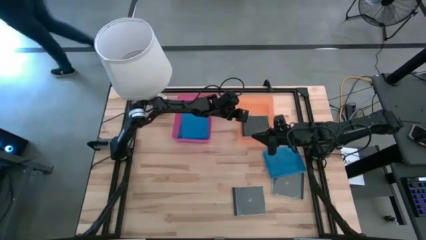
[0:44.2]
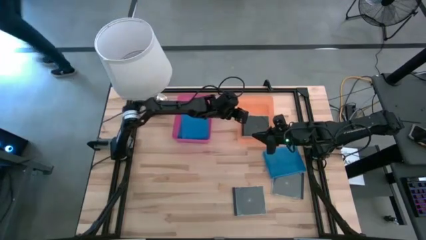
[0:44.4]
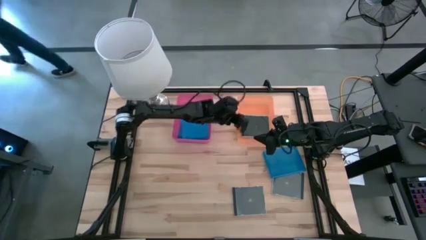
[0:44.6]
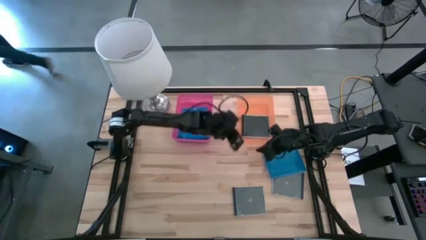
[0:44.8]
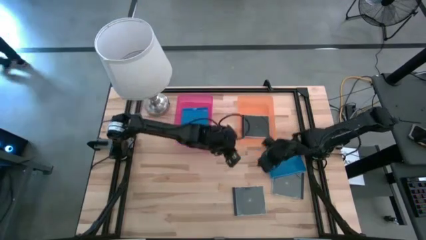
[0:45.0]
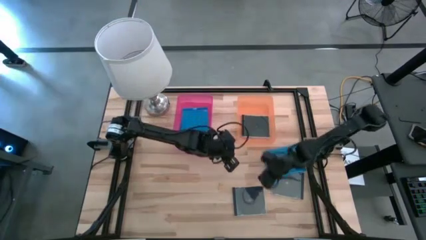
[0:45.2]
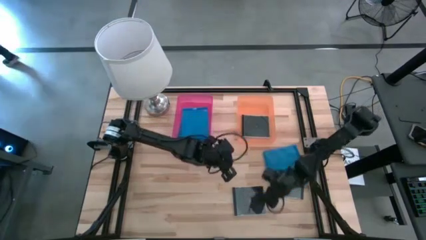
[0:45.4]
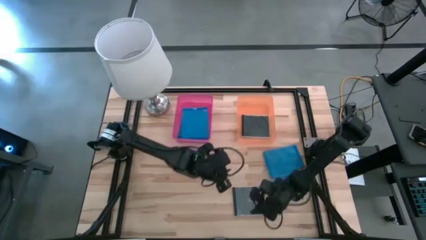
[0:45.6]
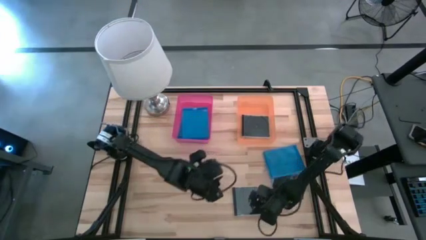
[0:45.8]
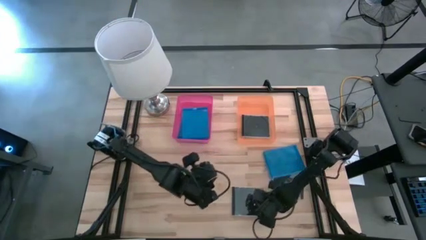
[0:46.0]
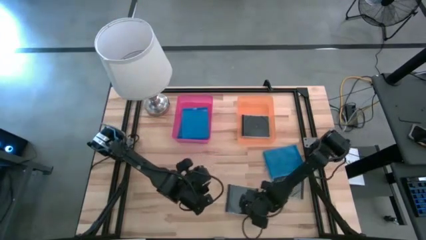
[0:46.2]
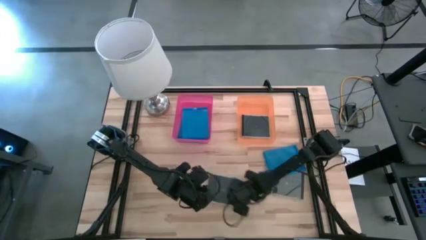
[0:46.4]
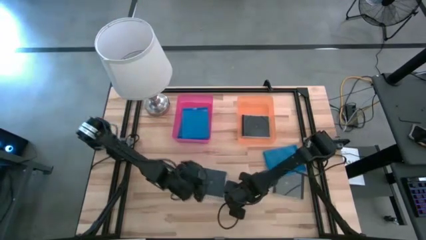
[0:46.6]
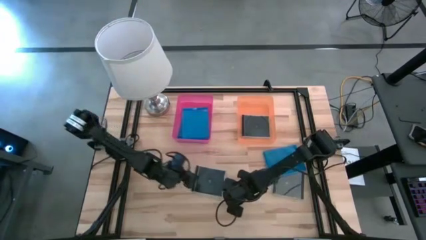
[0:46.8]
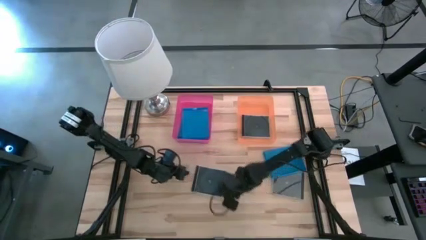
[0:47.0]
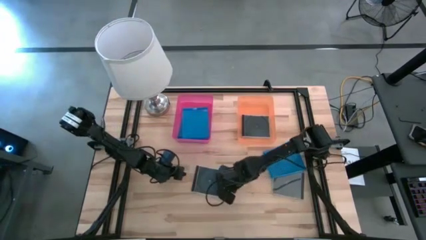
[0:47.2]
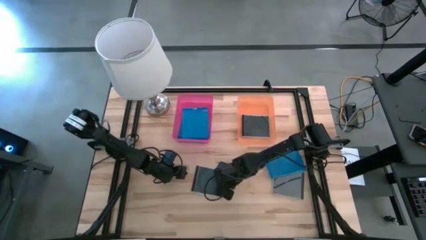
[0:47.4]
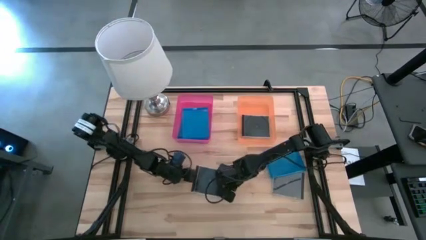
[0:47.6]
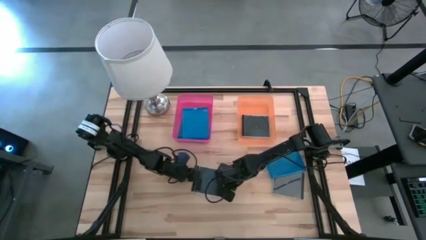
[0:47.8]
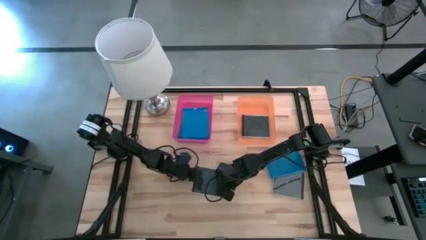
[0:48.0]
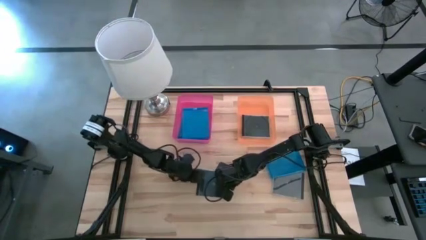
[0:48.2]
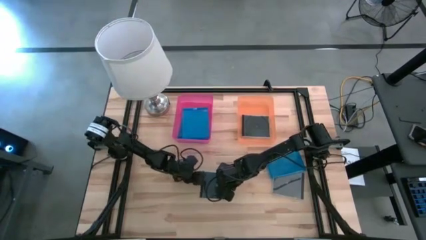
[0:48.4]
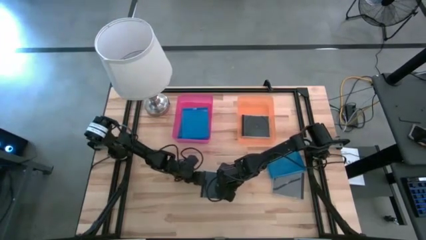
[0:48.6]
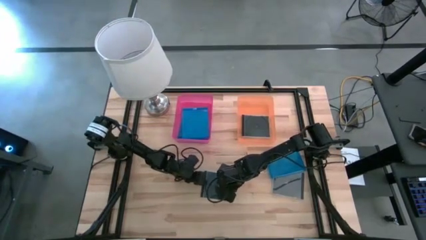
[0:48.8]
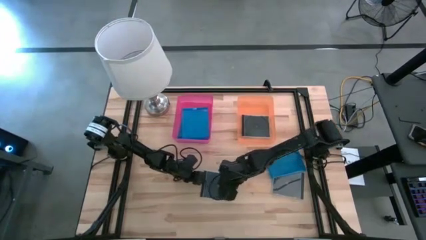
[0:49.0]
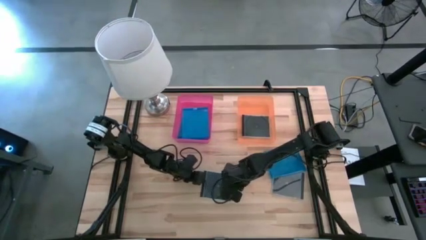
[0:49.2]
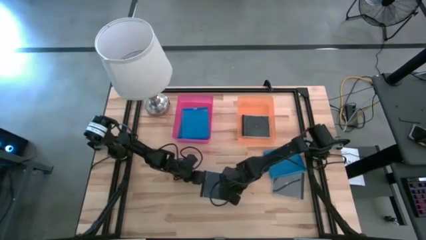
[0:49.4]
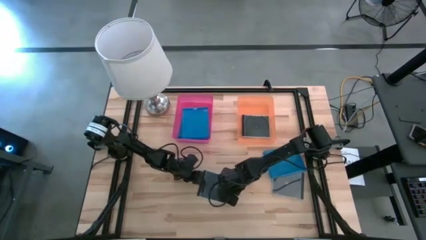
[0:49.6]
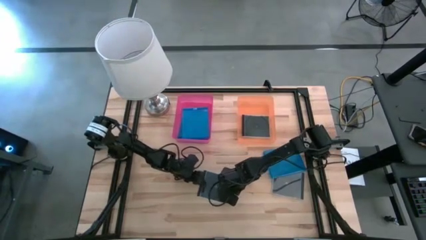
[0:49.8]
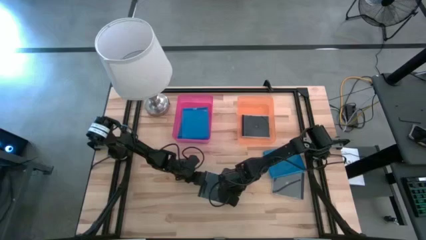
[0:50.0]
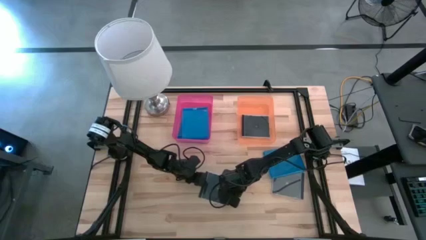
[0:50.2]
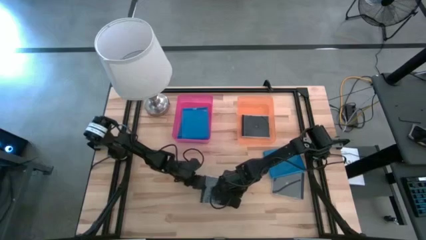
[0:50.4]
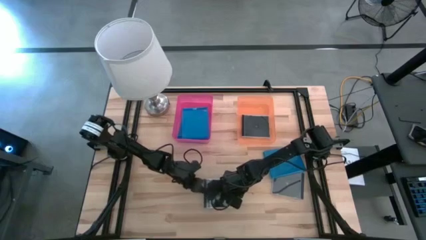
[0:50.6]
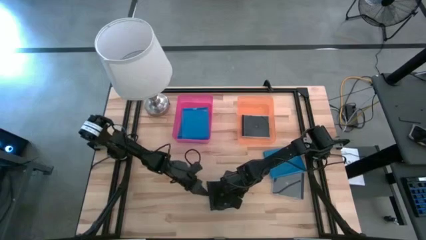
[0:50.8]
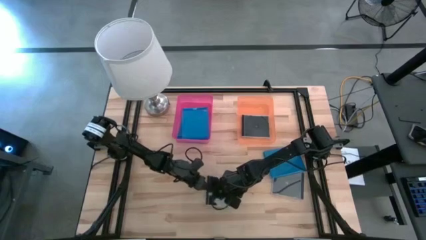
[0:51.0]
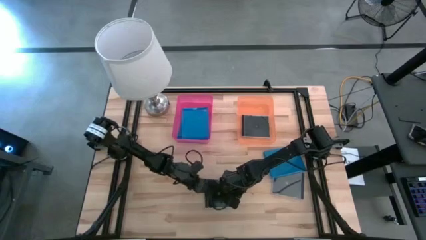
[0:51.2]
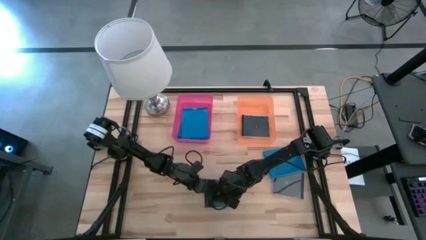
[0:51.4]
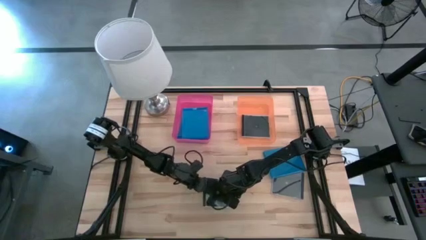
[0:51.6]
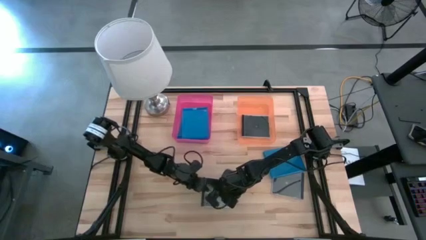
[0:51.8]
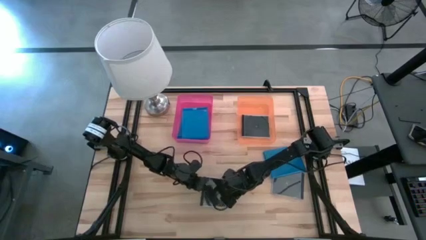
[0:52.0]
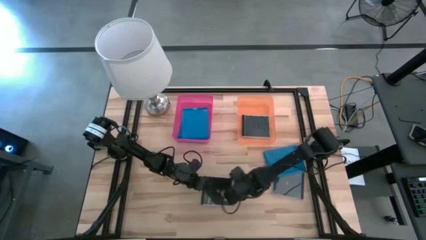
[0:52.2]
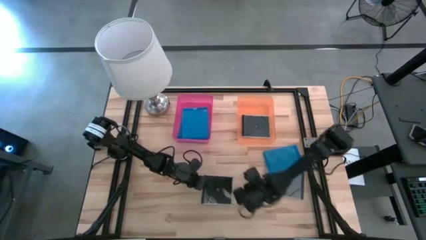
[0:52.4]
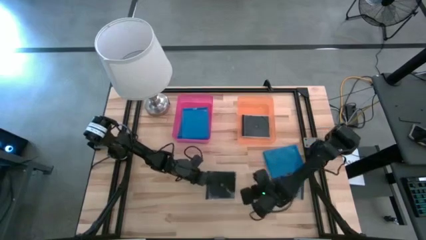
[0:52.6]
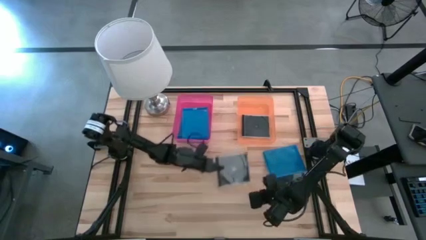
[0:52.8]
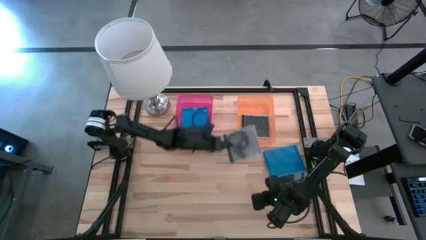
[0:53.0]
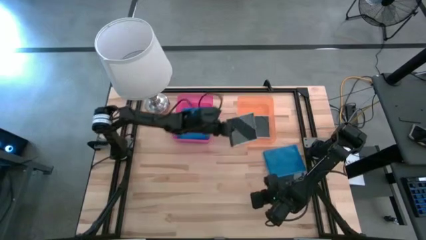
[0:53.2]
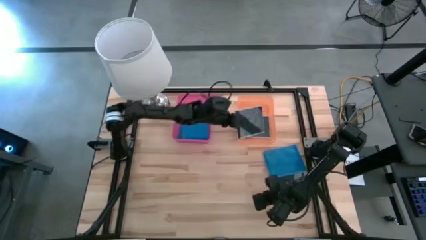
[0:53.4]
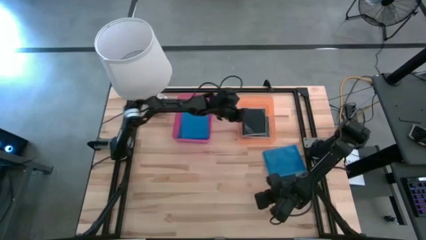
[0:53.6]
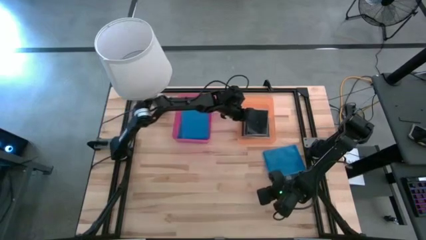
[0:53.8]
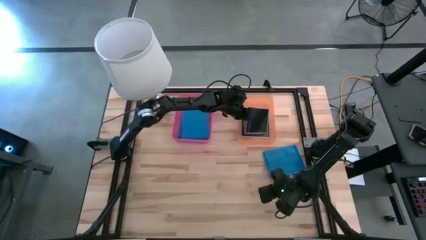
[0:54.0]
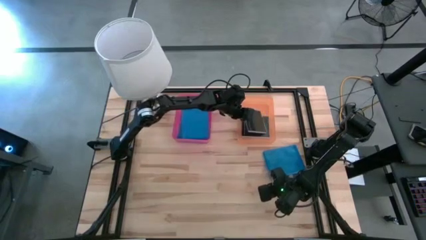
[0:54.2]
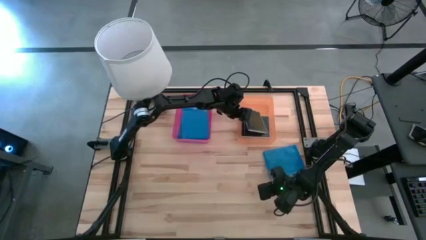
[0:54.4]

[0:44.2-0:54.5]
Task: Pick & place jewel cases by type
Put the left black cd case into the orange bin

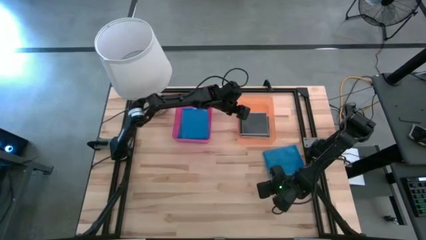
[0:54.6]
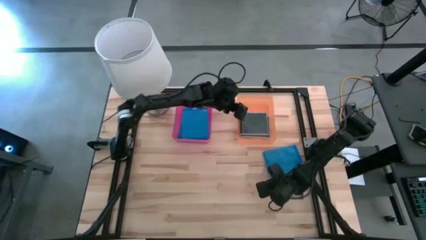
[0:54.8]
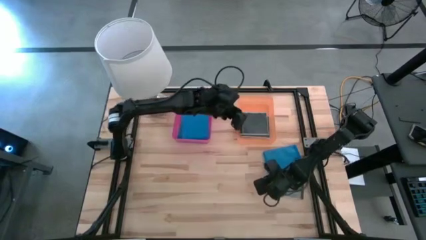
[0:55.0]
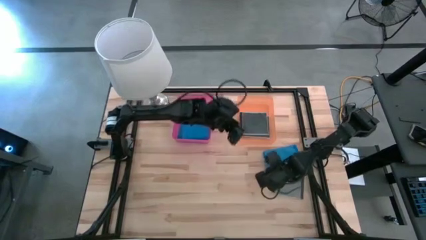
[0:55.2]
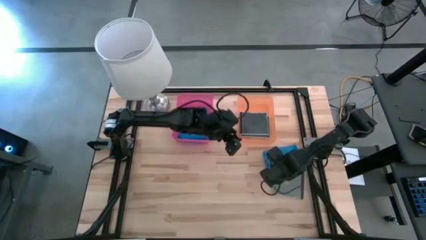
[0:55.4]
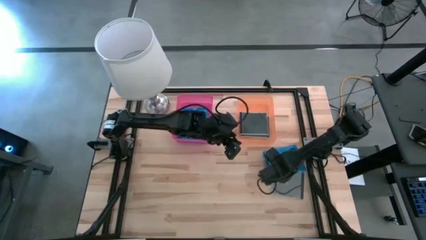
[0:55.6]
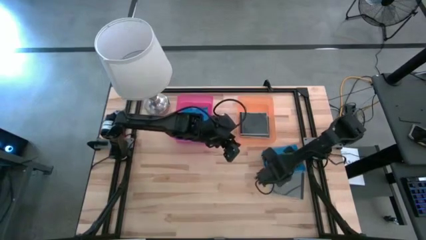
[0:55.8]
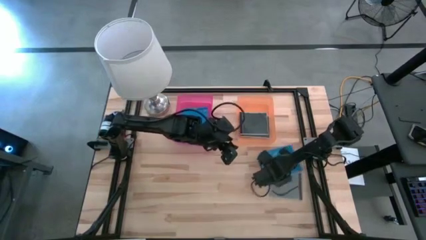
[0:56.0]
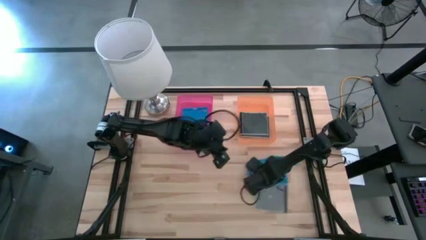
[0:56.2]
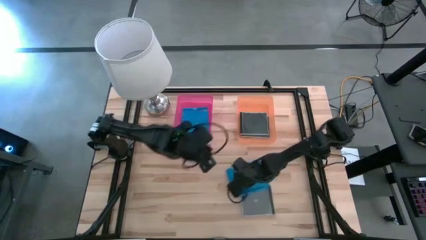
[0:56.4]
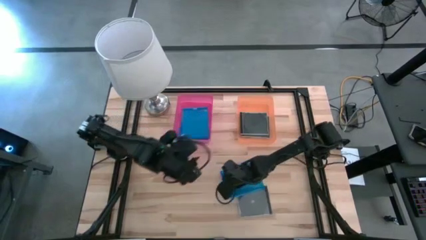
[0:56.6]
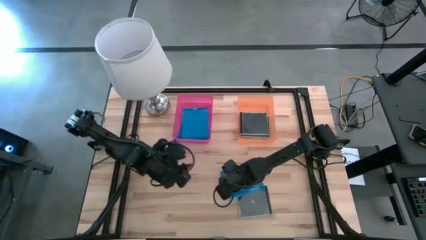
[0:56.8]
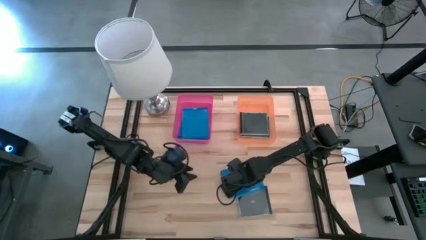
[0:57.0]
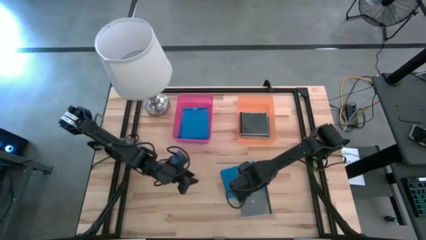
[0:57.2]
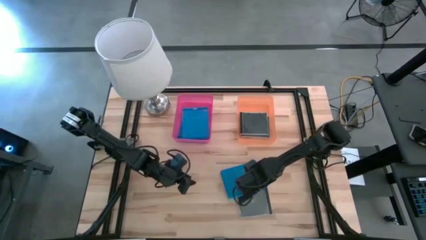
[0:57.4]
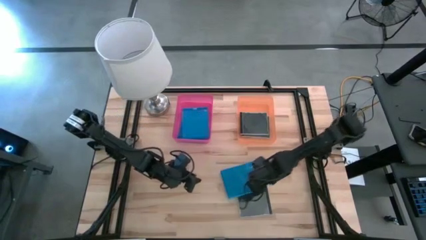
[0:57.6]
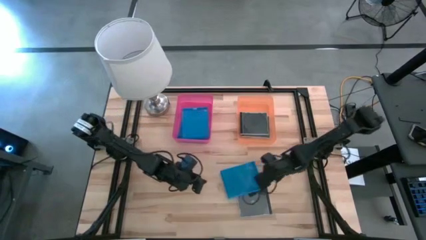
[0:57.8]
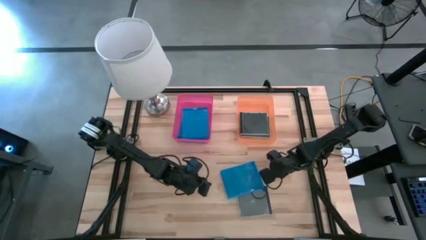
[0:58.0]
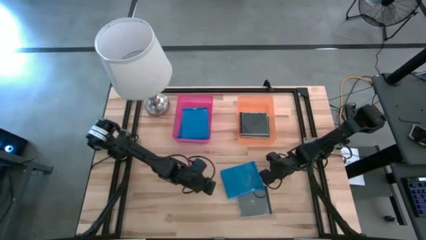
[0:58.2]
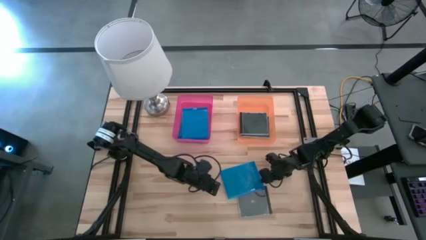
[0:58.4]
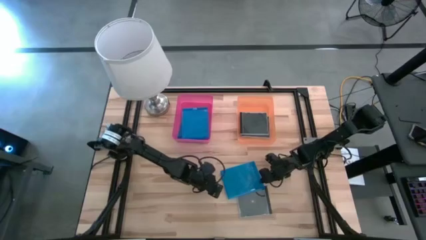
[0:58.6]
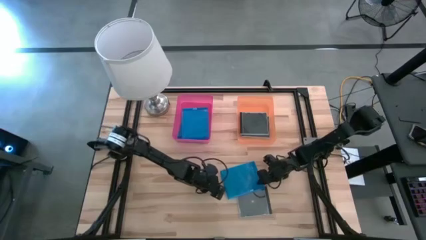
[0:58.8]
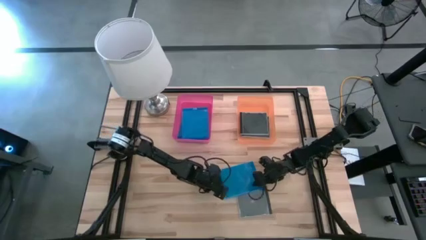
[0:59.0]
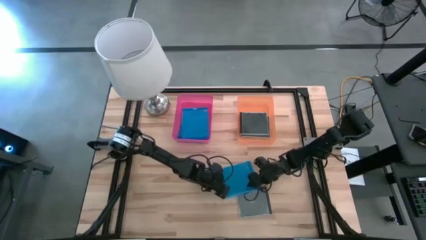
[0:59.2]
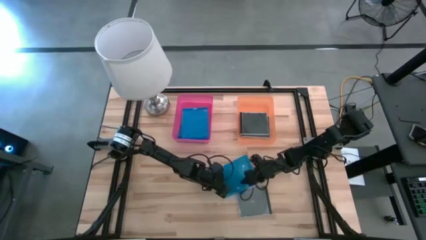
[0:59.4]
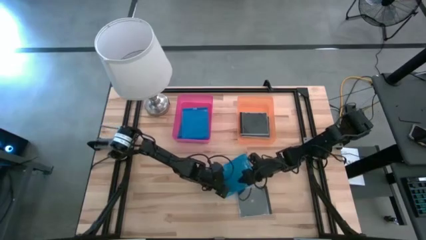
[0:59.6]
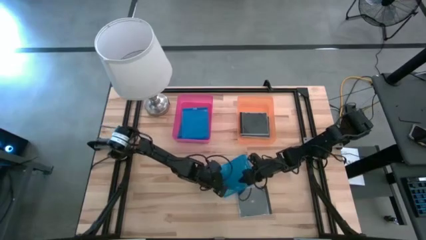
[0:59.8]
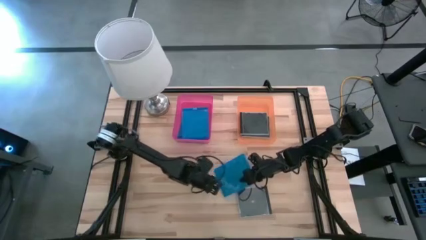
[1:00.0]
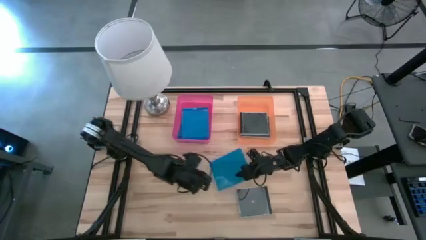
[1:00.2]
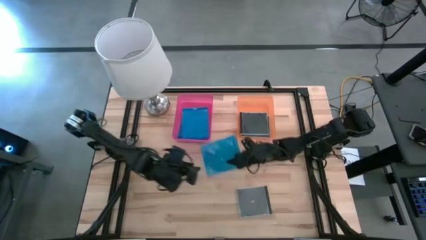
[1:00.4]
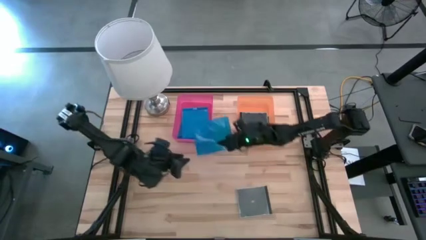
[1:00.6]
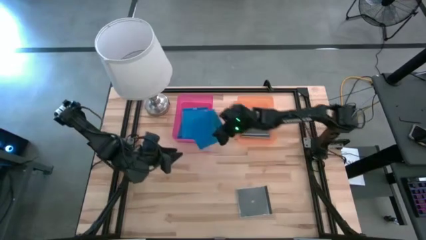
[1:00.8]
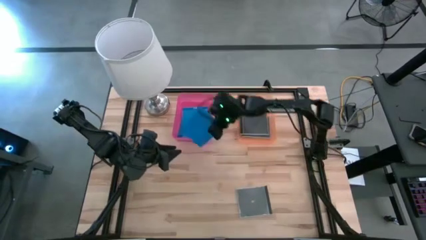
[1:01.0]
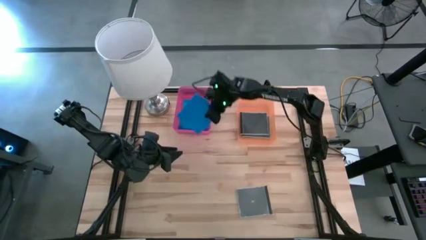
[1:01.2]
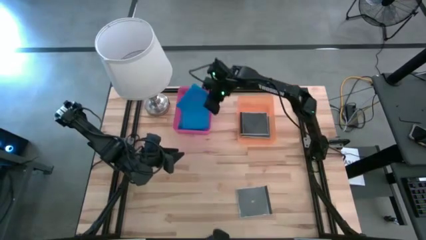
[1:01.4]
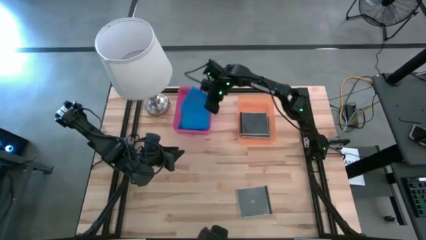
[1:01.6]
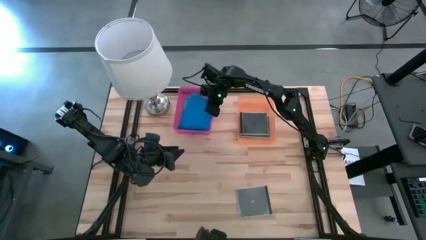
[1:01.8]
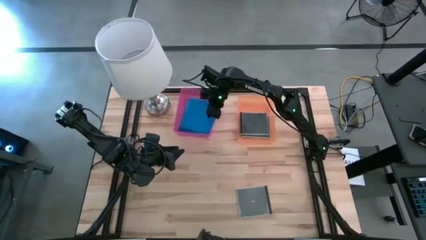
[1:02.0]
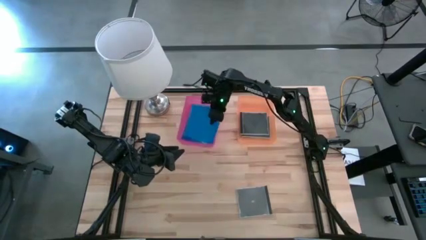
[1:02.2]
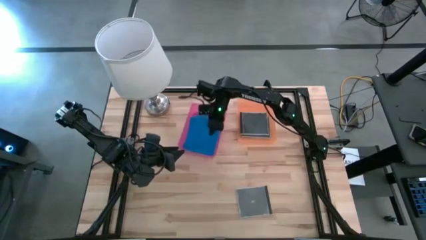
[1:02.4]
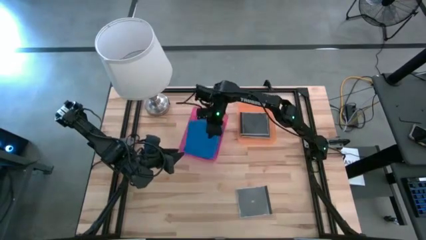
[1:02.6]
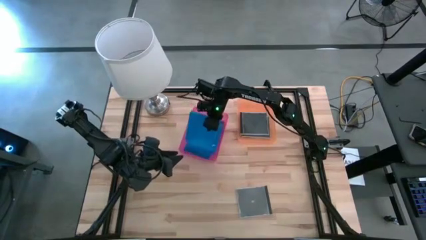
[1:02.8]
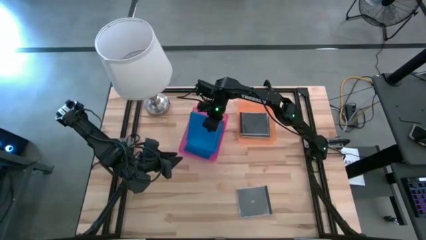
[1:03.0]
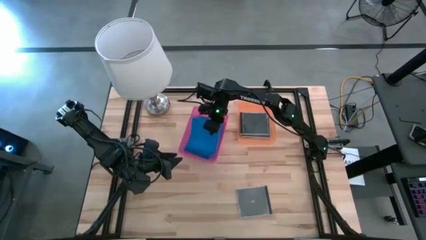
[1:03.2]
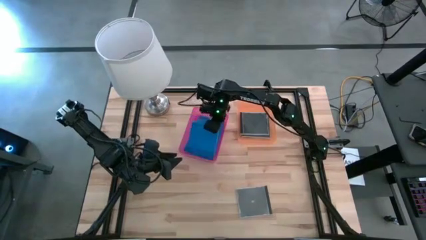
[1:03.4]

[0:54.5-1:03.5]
Put the blue cd case into the pink bin
